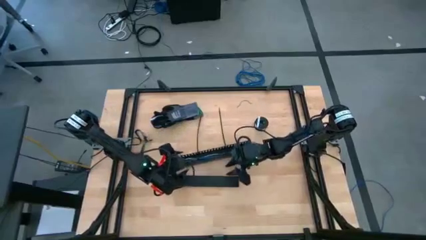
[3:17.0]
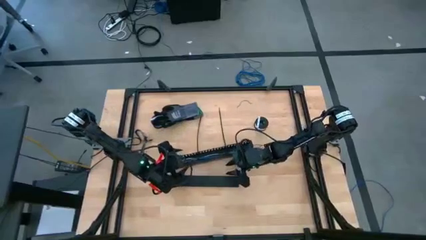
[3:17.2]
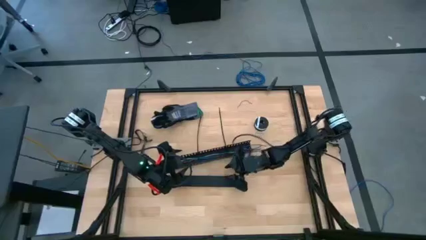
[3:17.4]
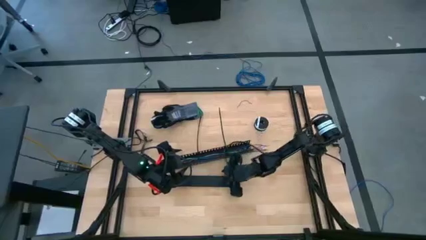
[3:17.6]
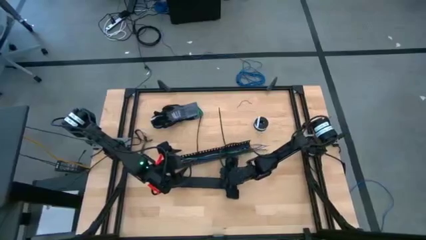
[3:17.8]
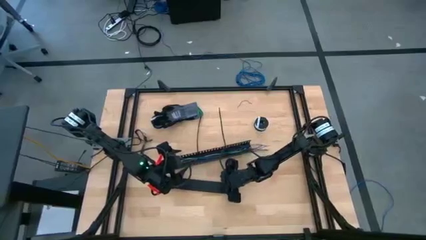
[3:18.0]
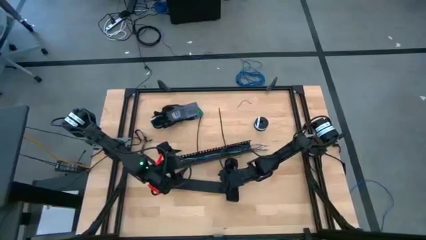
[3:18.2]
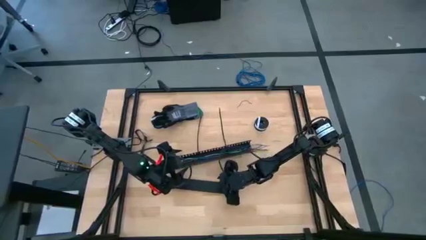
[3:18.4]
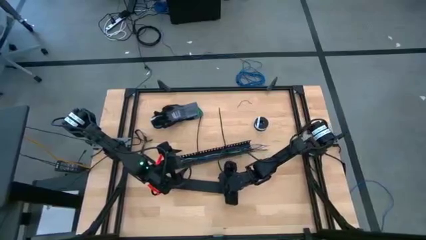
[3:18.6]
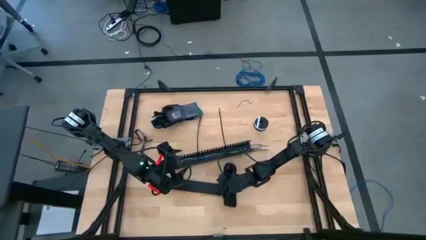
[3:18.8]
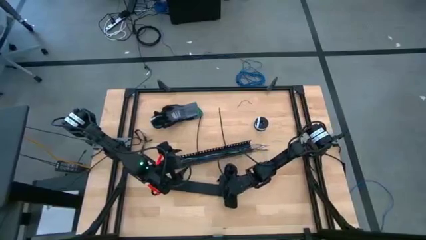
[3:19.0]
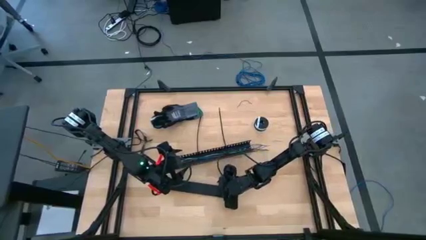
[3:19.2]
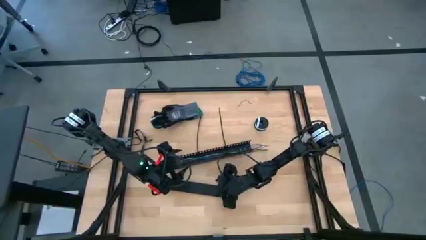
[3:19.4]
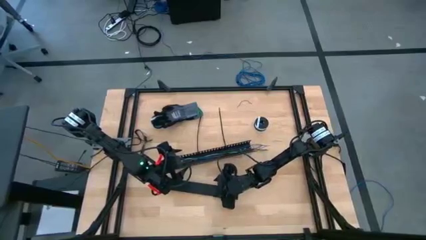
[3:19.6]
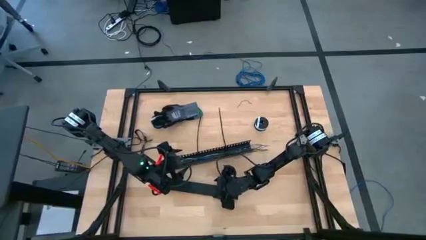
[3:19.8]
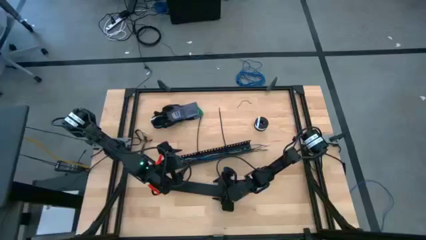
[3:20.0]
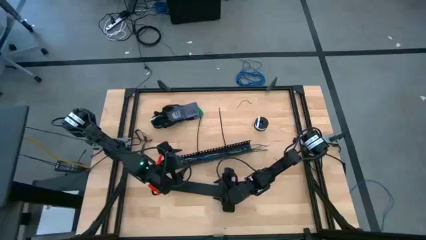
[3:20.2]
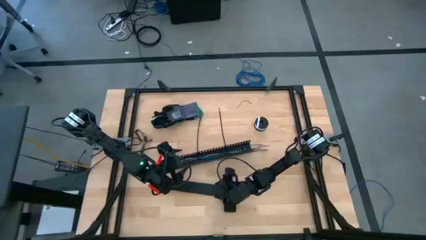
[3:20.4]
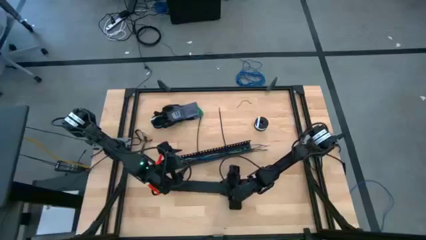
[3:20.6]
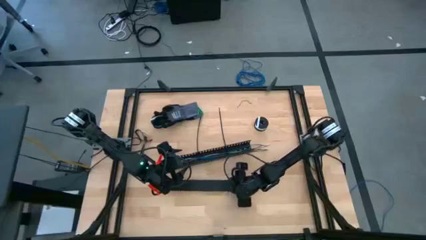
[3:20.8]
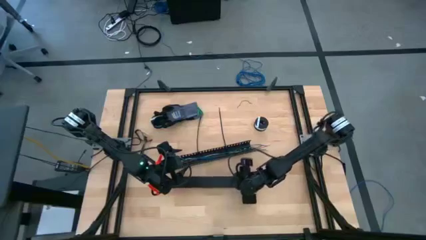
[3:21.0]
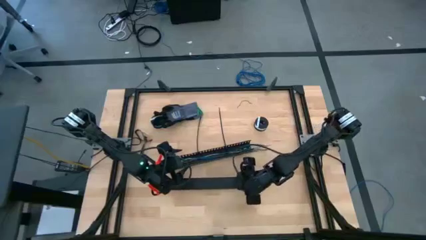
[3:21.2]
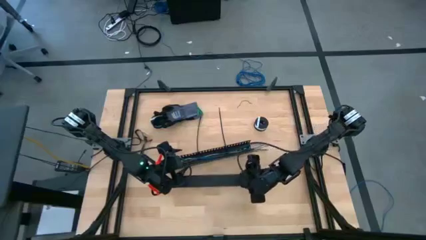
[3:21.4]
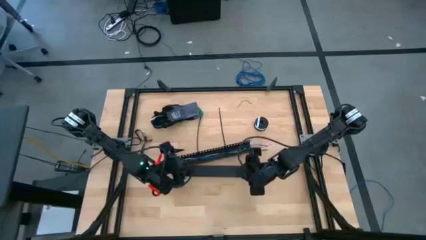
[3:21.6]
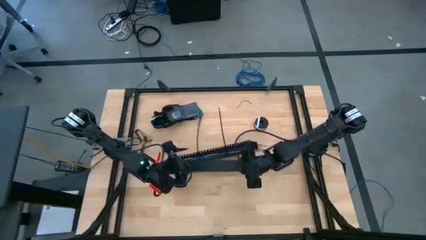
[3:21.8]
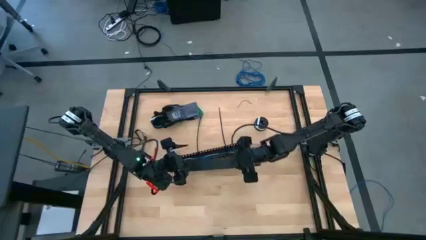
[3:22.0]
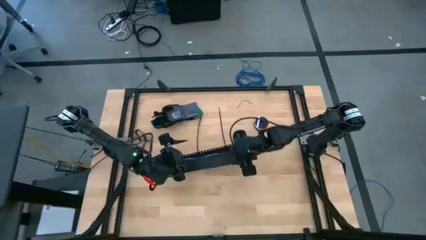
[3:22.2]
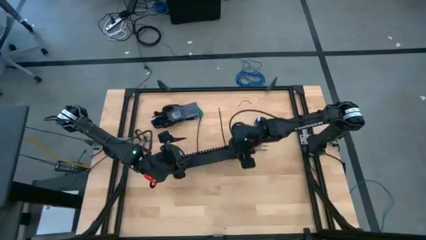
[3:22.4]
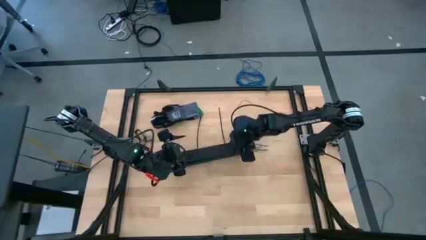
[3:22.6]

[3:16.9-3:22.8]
Task: Ziptie cables
Close the black cable duct

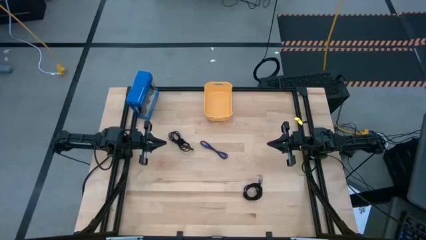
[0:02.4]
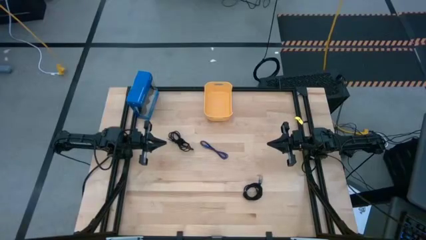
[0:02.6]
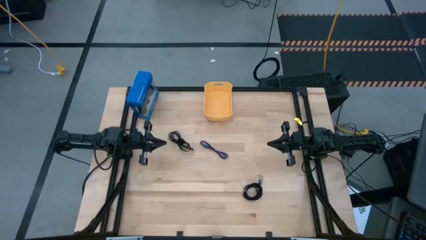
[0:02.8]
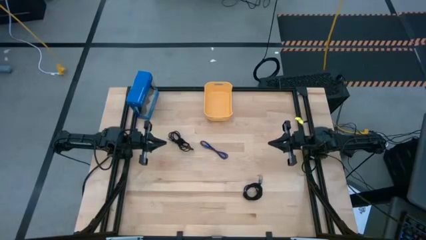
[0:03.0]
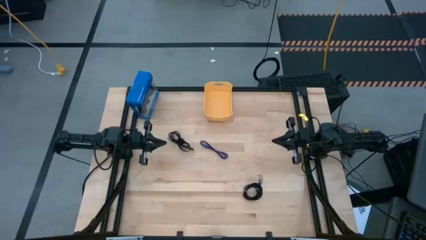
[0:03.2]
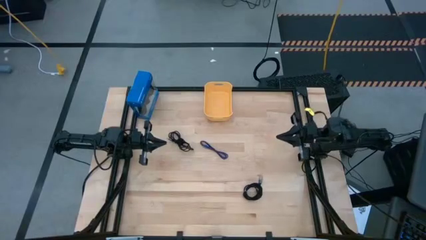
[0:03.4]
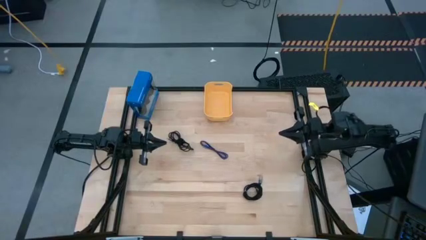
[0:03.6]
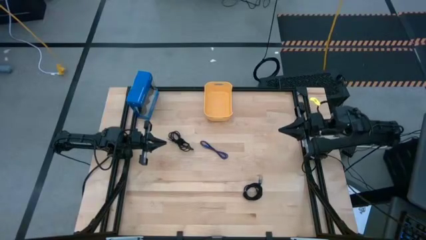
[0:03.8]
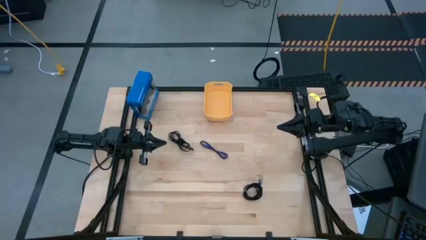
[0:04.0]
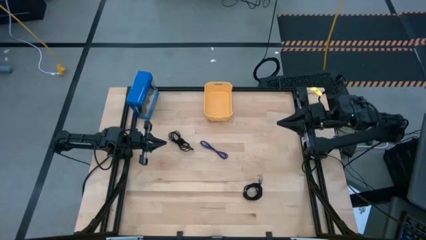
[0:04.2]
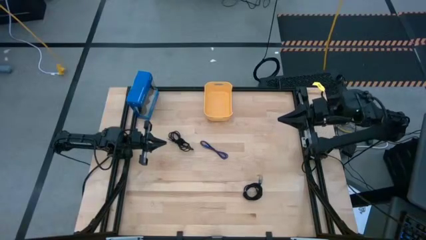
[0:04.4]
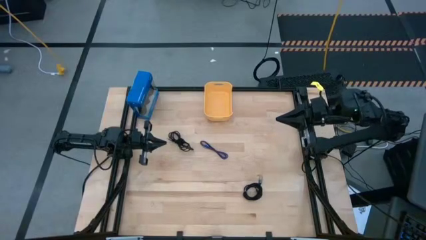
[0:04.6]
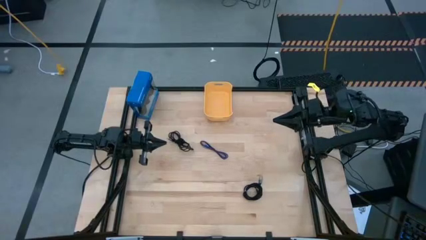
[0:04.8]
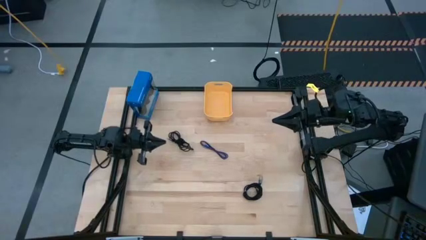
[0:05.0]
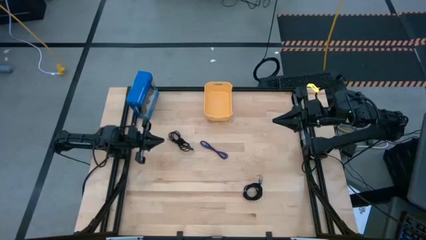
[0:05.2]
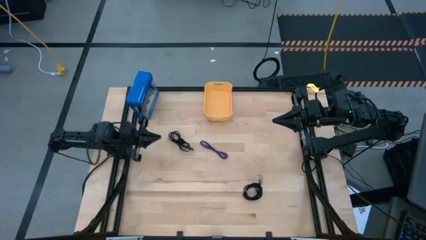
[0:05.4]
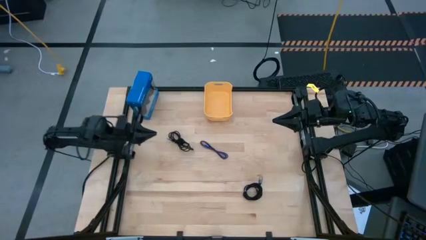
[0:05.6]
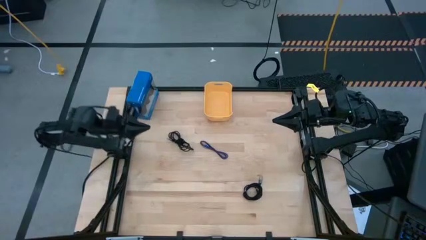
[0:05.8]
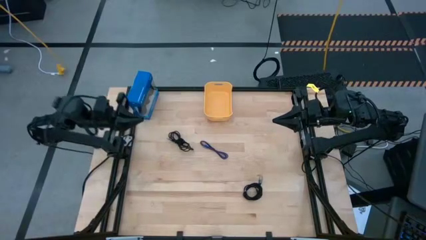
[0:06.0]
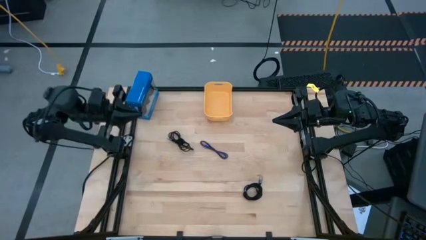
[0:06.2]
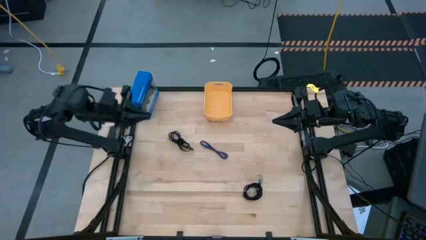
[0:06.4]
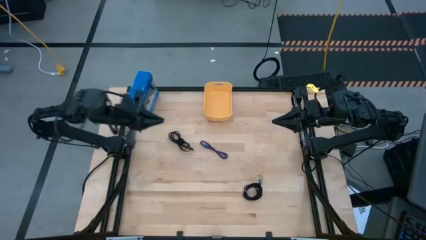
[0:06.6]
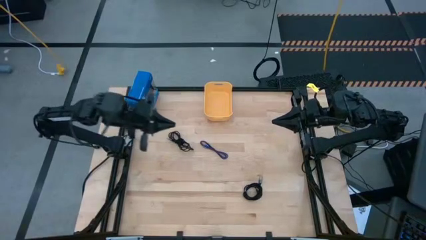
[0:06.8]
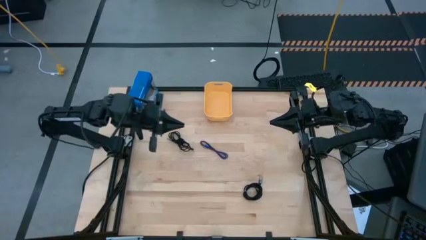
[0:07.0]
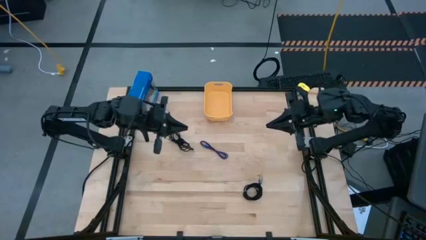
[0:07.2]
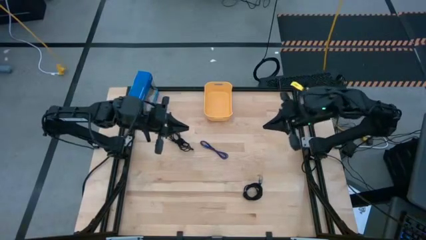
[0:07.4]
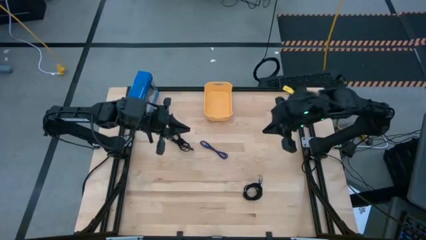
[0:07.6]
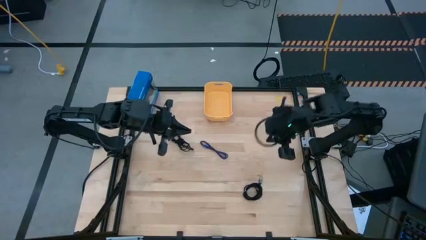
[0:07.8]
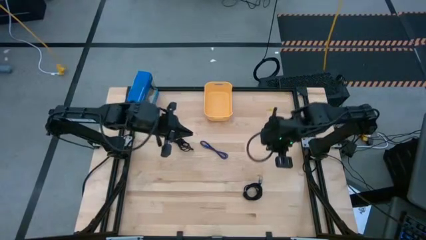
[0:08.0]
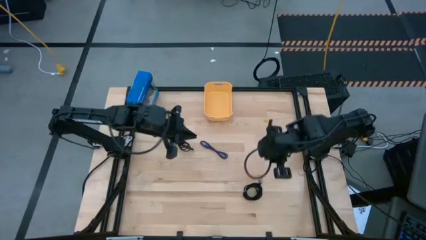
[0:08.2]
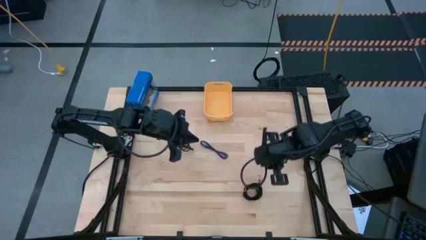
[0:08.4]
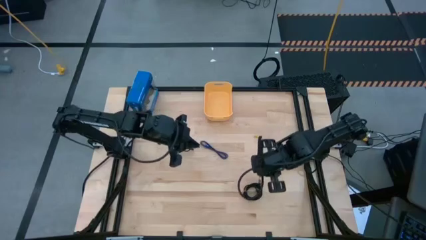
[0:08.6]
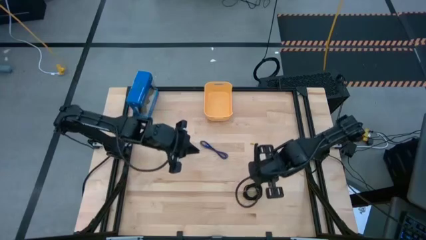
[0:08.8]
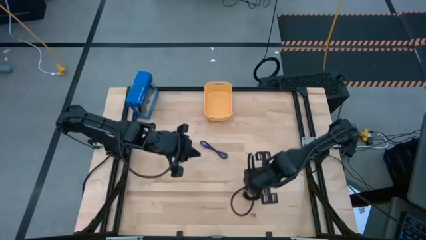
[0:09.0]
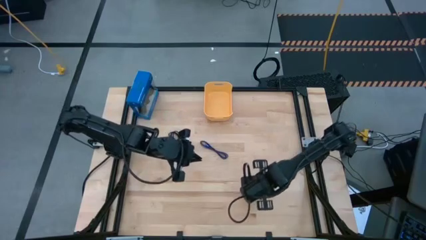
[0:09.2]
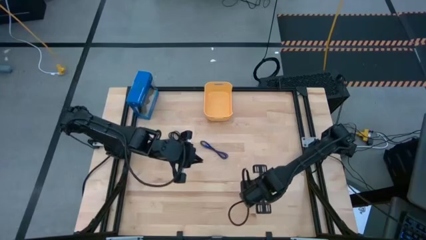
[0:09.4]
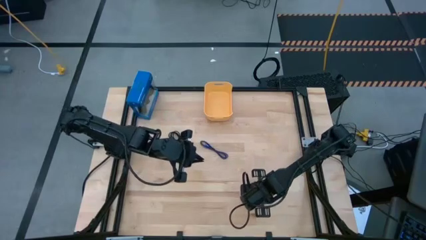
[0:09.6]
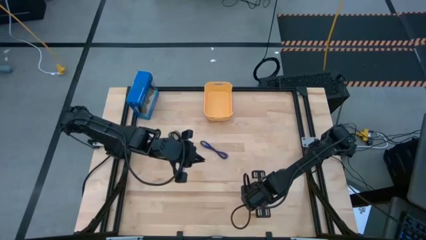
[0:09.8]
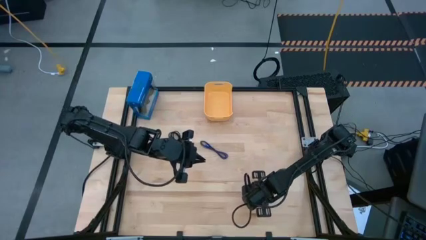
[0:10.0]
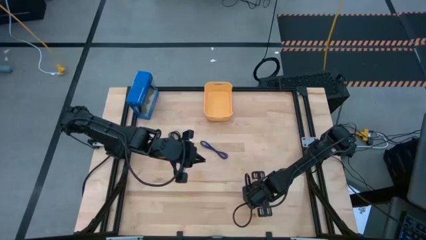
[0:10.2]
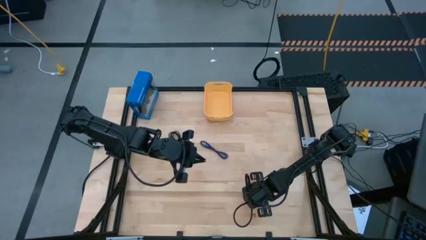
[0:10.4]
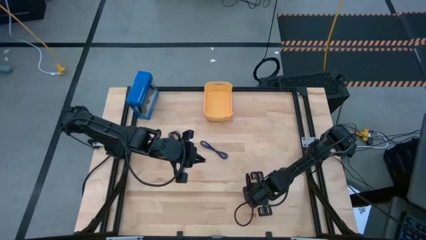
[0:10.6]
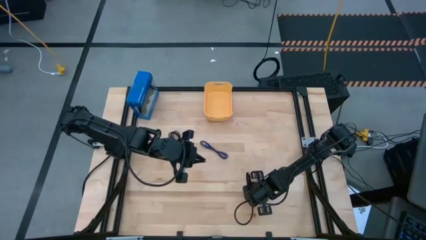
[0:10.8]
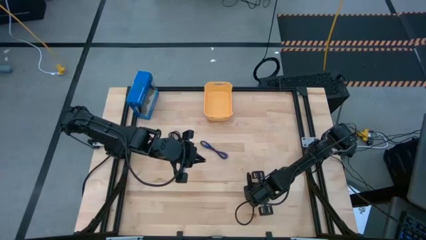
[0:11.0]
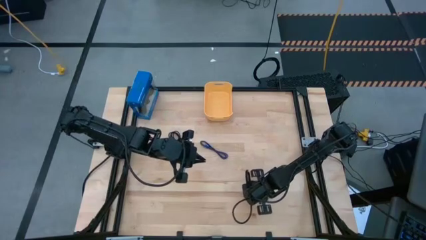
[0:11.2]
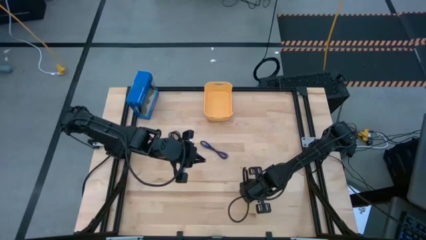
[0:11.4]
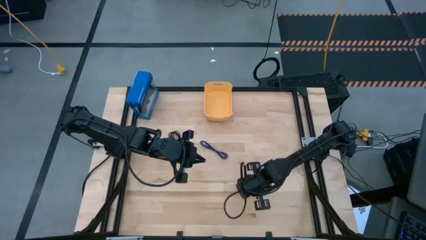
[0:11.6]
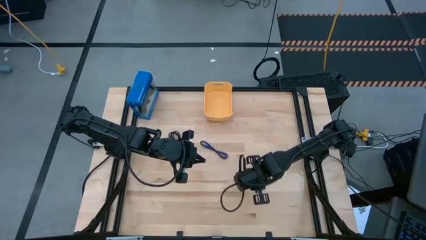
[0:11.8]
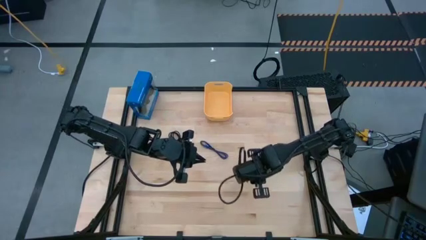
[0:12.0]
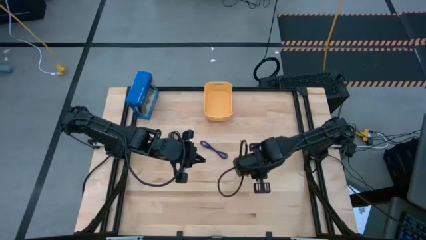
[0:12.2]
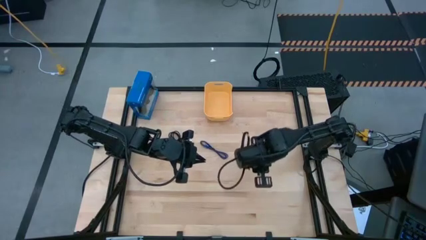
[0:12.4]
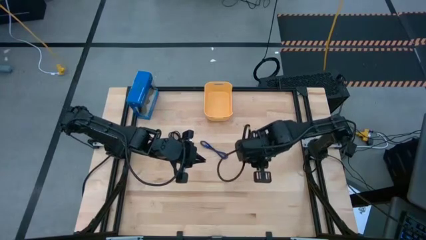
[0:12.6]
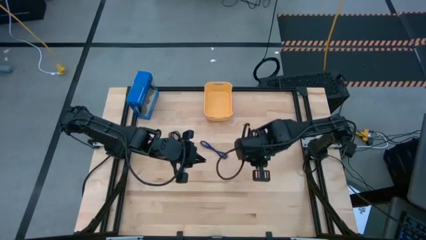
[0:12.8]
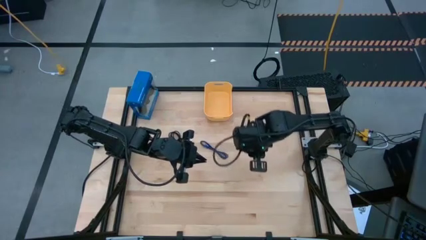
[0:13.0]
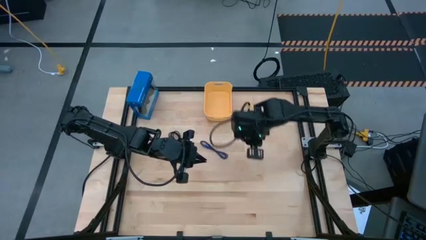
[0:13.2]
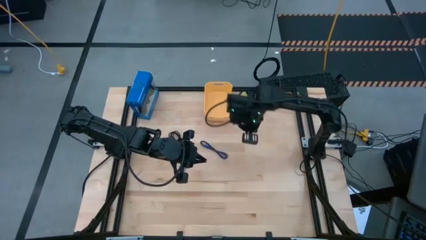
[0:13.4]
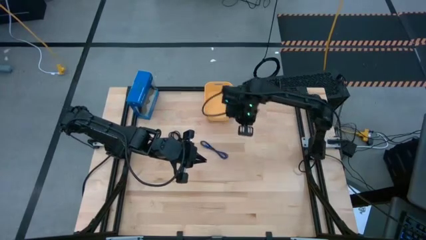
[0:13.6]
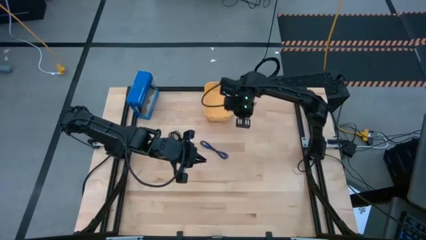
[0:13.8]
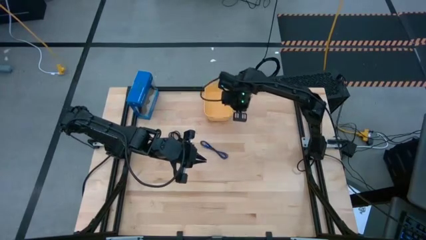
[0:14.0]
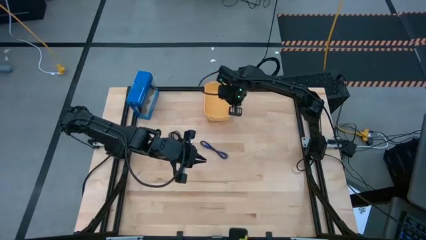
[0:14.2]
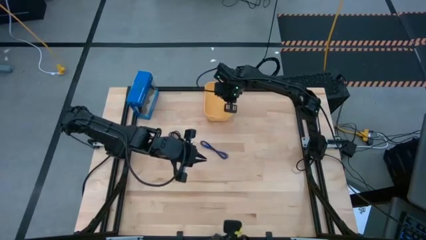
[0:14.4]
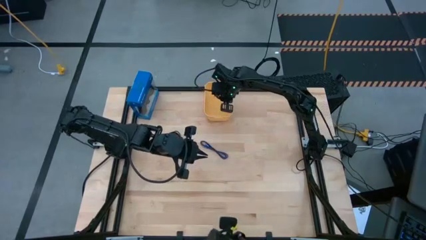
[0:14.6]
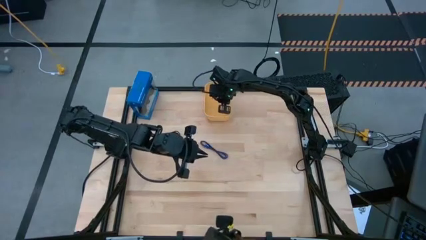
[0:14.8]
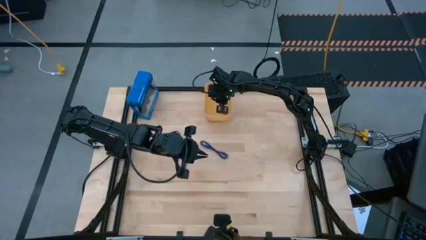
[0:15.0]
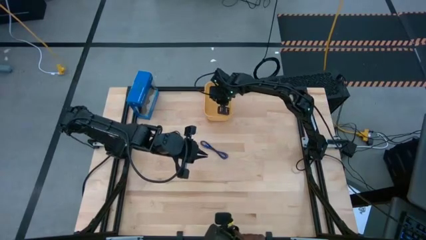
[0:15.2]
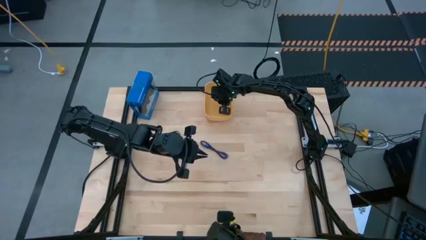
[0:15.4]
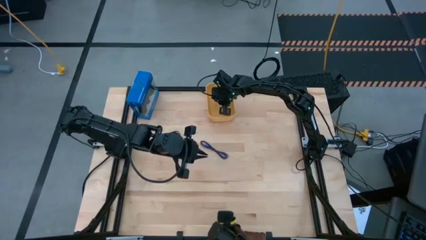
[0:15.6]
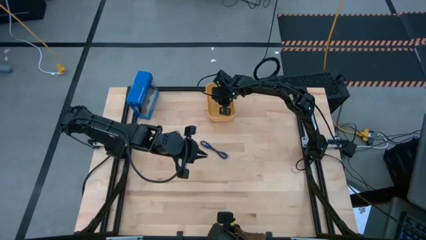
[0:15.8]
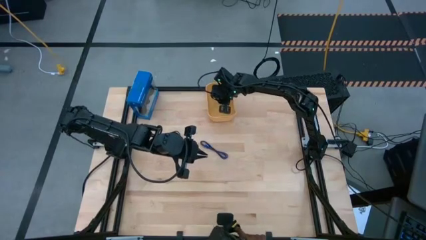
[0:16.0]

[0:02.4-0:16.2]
Task: Pick and place USB-C Cables
Put the bottom black charger cable into the yellow bin
